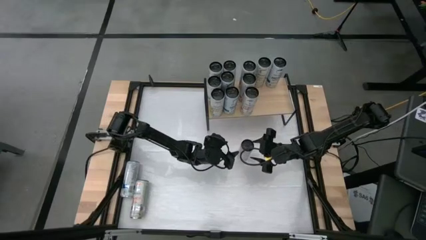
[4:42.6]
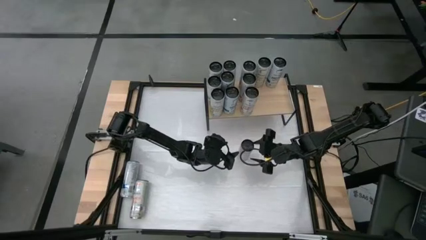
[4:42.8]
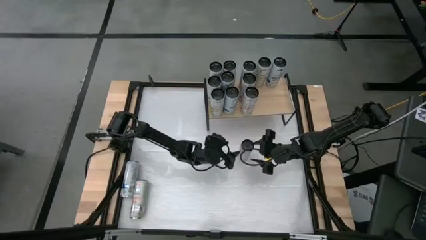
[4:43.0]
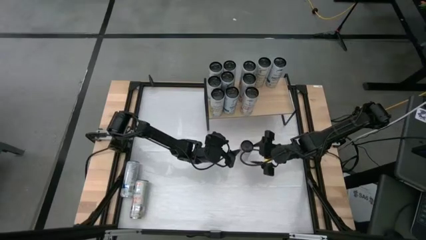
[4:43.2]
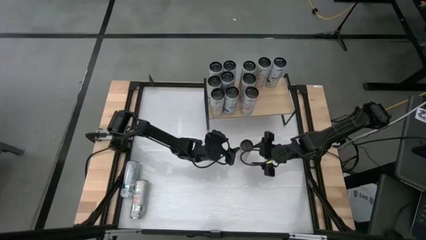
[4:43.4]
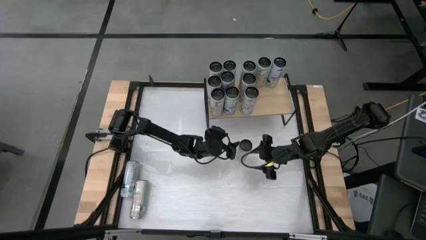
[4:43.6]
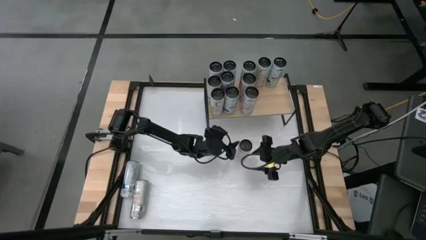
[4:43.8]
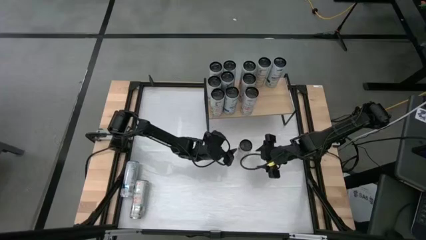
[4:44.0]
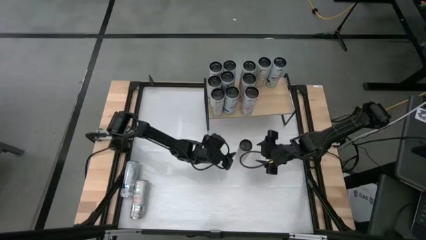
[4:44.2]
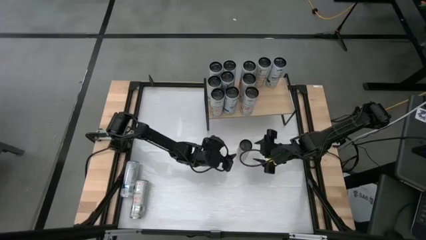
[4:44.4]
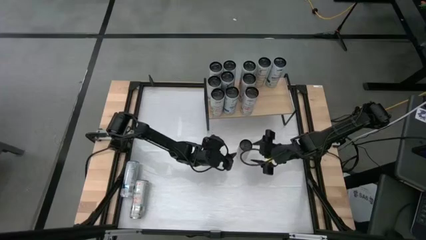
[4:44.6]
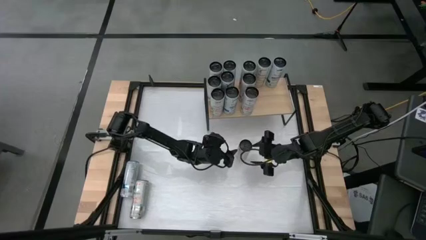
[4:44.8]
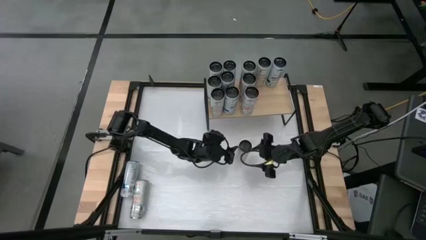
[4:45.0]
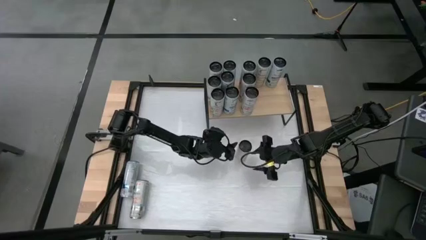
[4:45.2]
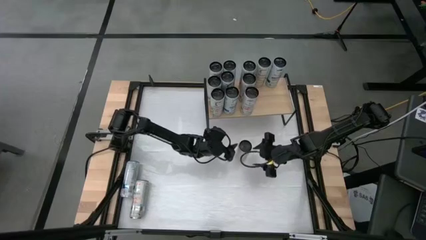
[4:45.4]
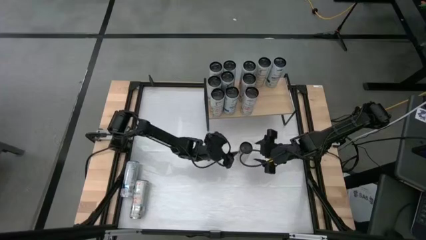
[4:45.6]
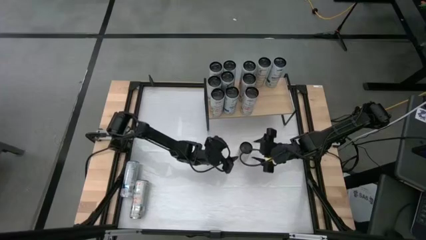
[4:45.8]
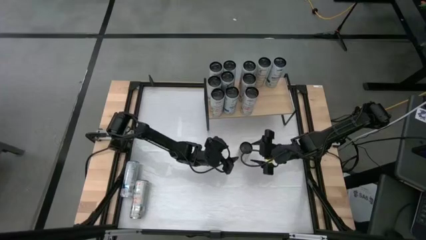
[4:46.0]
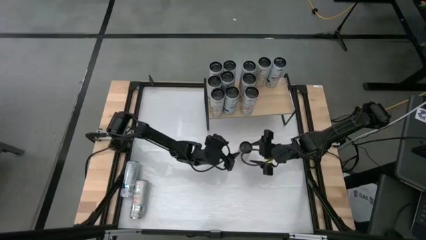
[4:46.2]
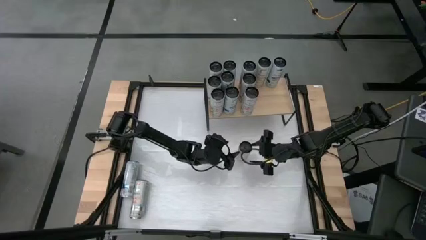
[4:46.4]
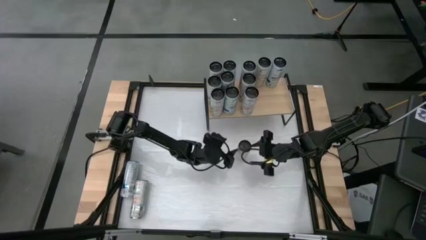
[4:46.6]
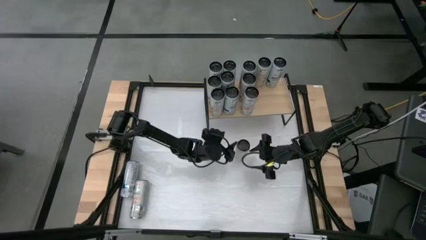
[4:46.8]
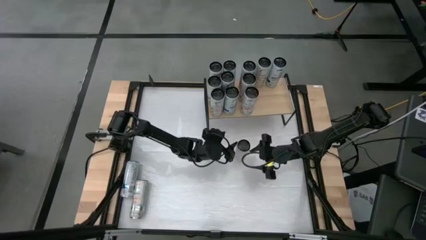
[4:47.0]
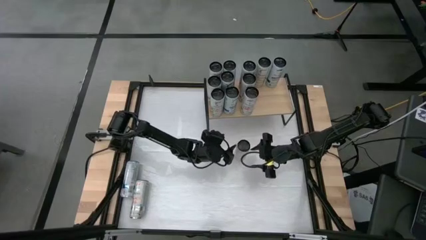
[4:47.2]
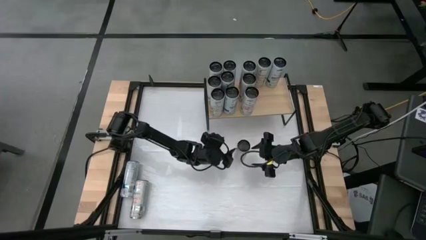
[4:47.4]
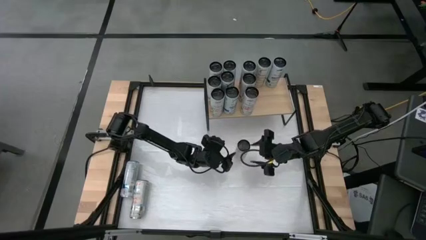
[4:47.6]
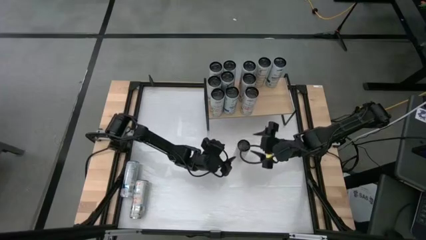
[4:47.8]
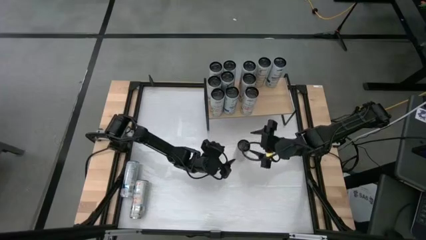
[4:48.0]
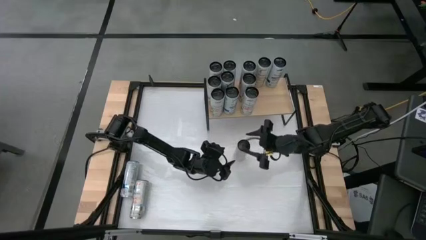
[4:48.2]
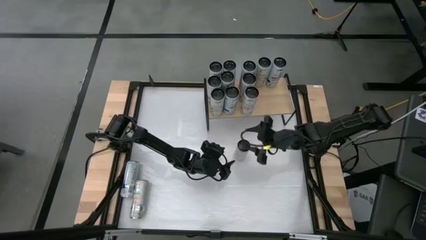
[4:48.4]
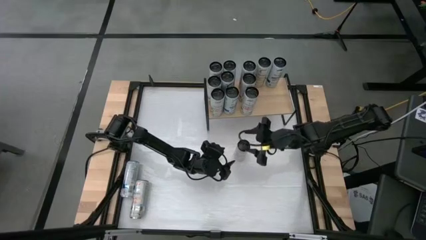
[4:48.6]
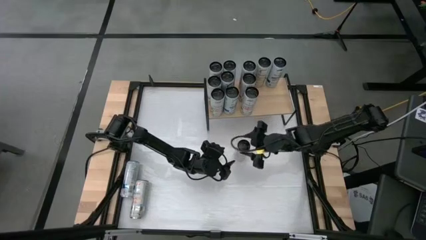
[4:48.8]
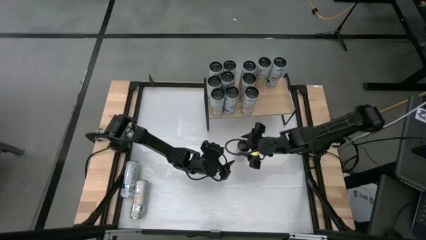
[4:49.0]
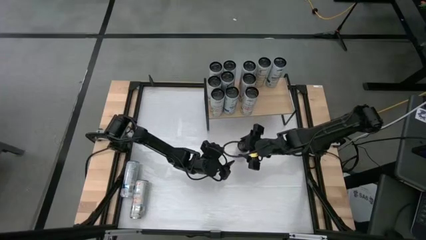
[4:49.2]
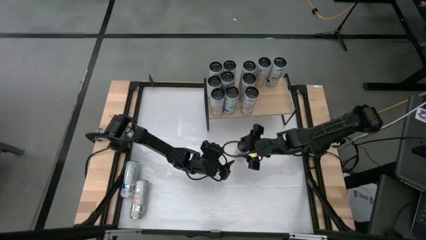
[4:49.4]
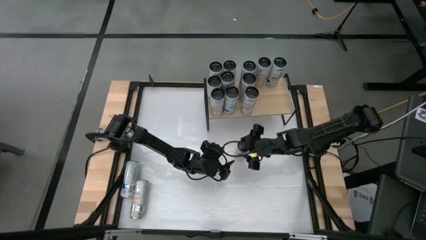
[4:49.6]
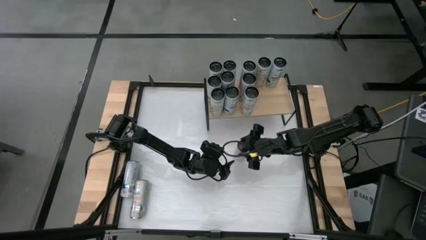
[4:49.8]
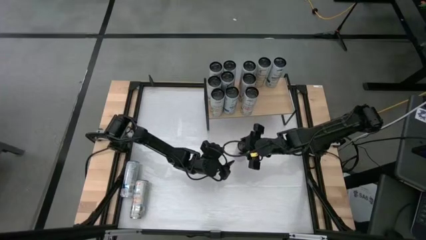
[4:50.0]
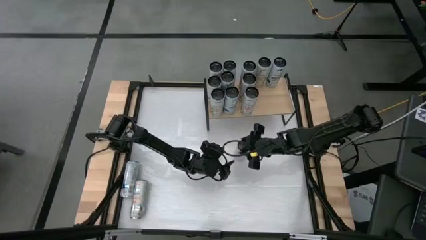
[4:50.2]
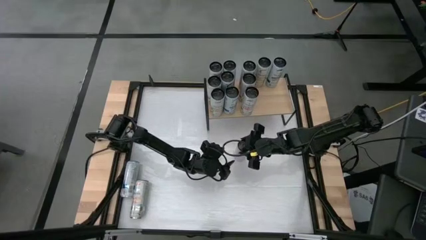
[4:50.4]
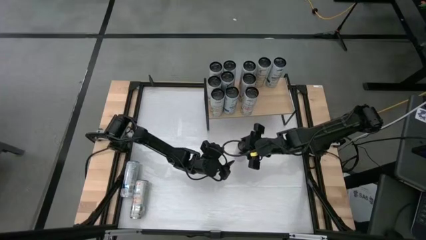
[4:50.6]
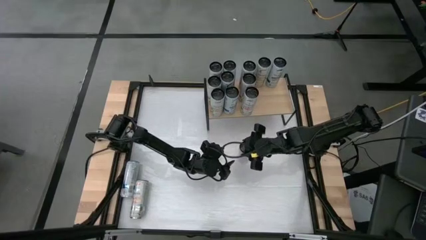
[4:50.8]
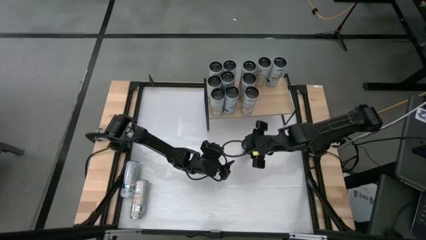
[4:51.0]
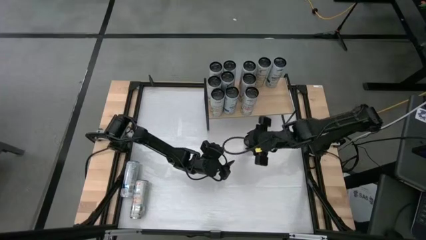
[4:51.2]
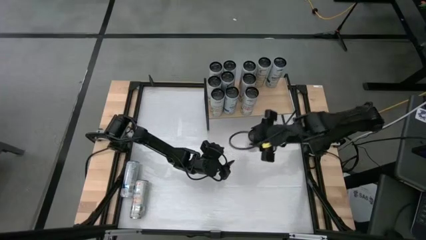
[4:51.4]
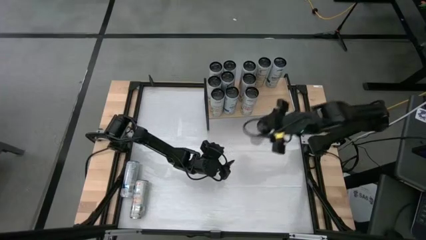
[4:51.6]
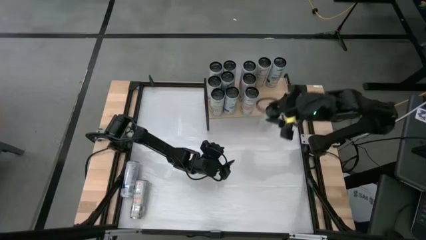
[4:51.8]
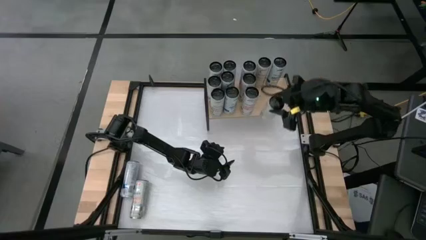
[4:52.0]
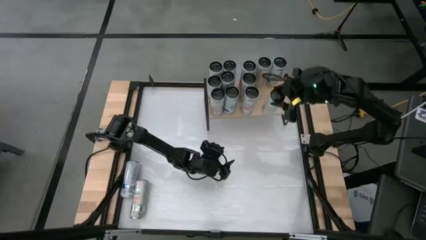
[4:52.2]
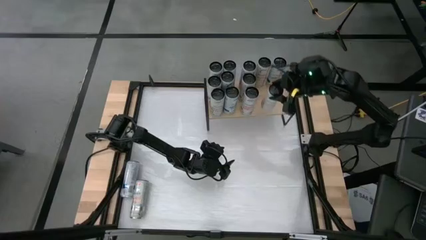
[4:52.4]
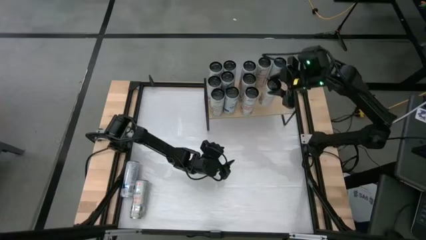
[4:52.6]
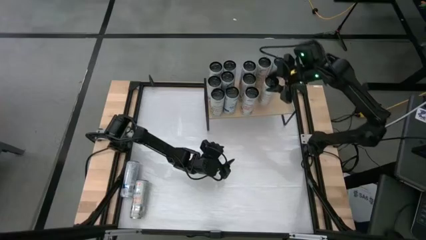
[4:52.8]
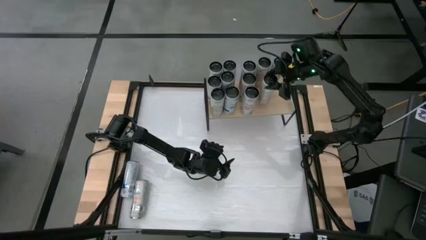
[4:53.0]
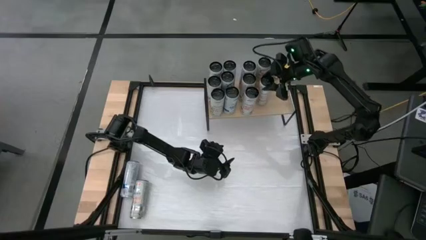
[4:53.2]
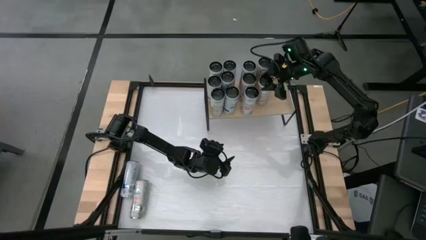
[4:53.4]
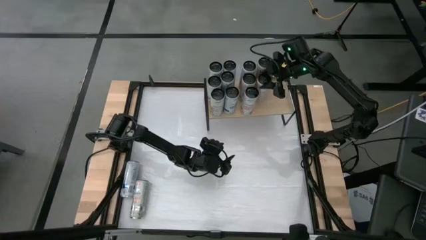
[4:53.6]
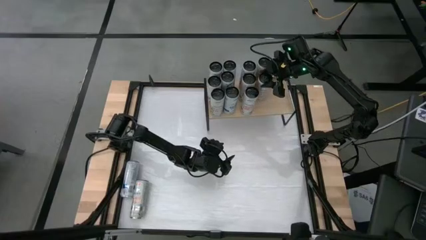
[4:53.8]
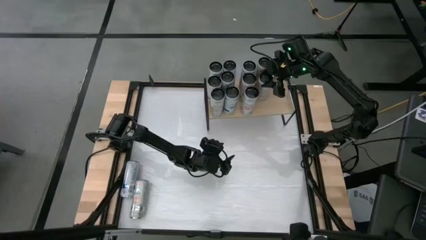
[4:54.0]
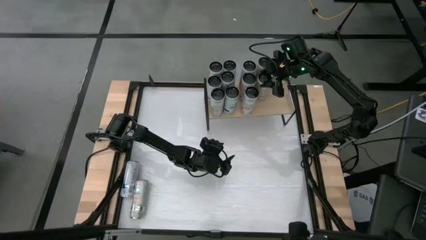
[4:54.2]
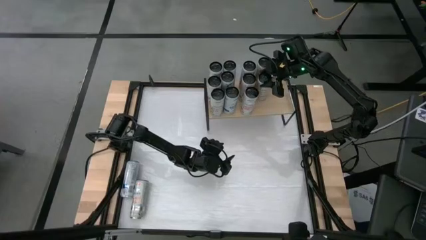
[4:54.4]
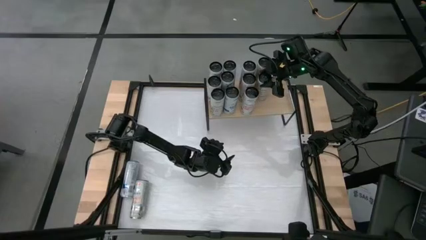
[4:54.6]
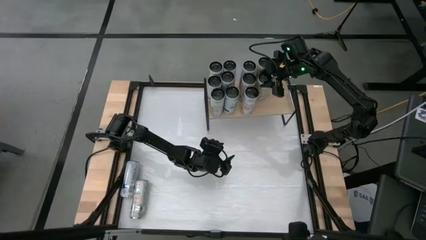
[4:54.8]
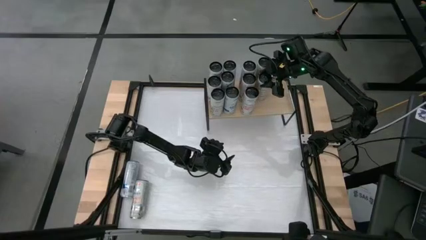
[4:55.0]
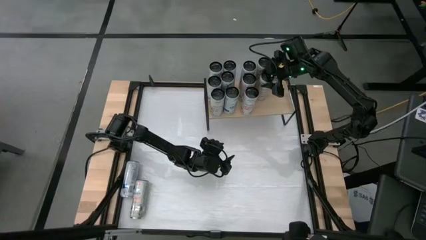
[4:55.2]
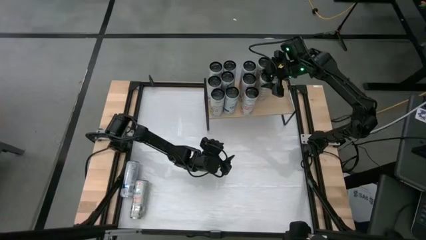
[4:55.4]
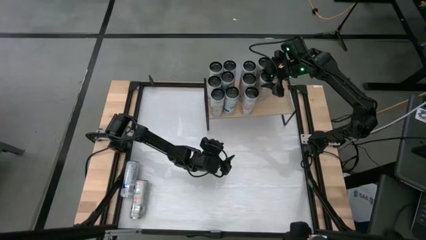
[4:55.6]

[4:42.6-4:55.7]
Task: Place canned beverage on shelf
Put the orange soda can on the shelf aligned with the orange soda can
